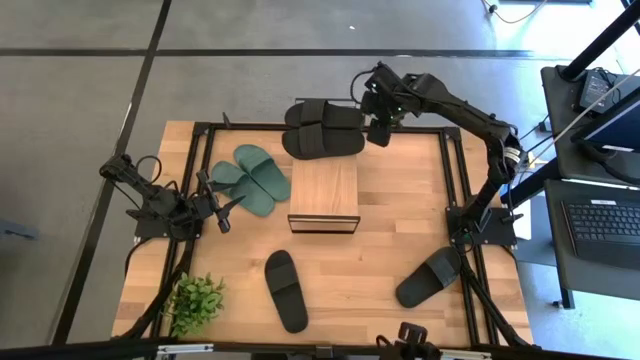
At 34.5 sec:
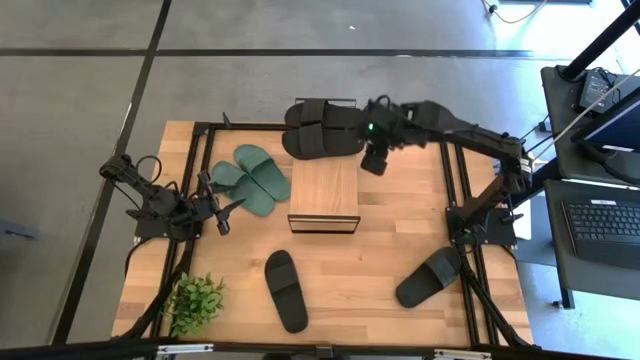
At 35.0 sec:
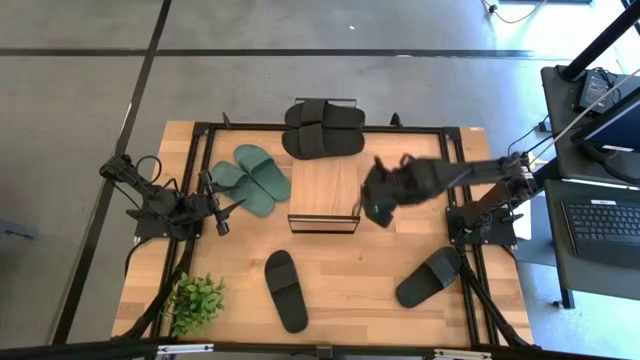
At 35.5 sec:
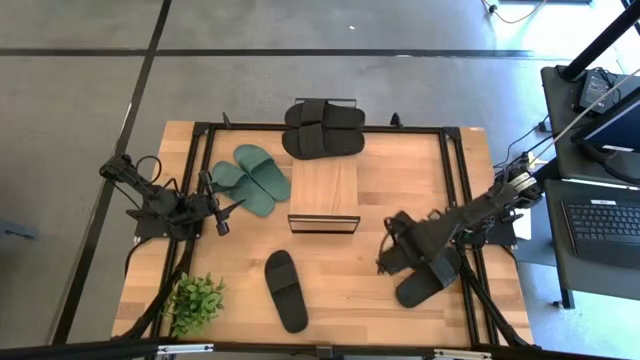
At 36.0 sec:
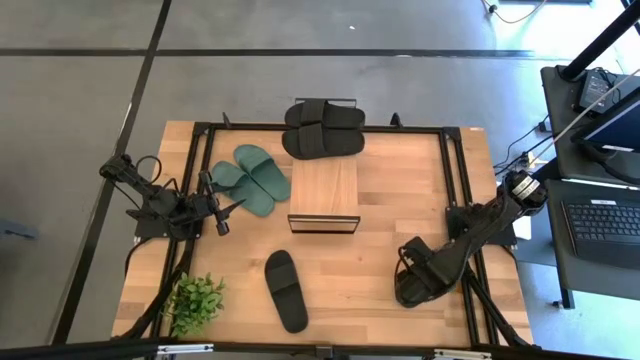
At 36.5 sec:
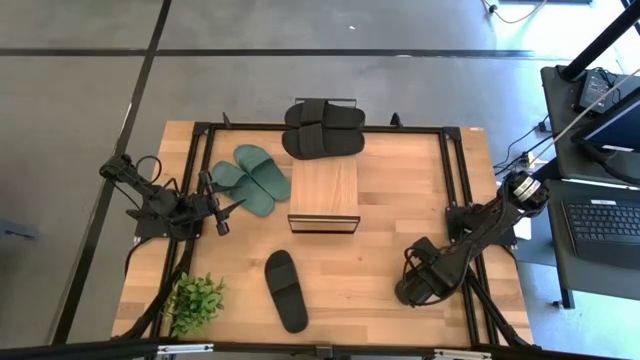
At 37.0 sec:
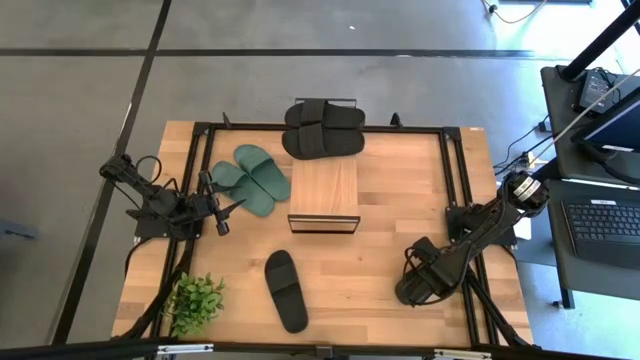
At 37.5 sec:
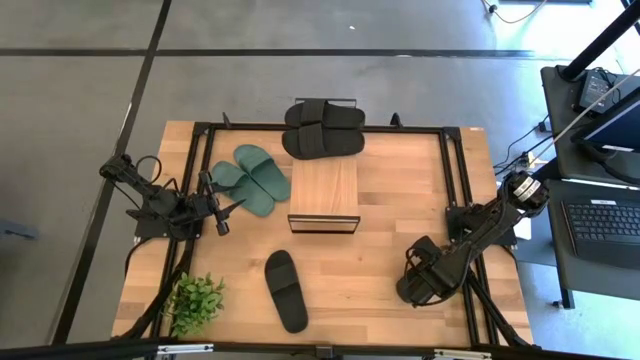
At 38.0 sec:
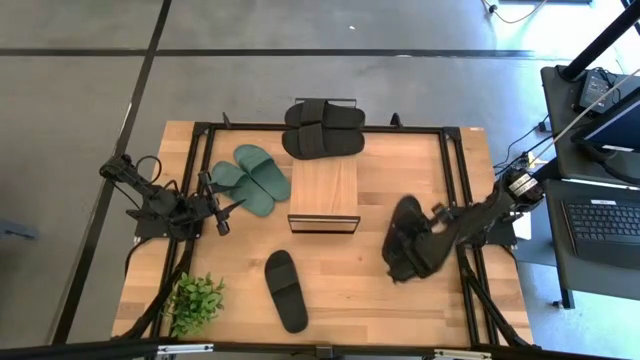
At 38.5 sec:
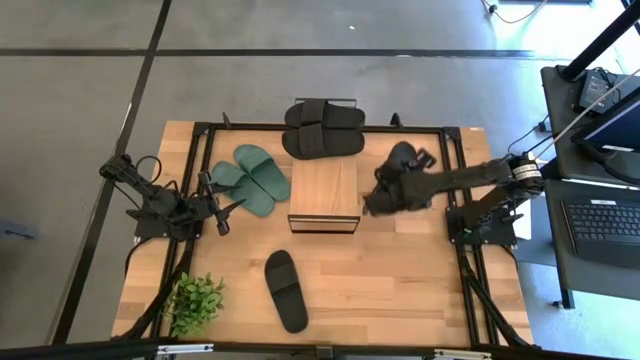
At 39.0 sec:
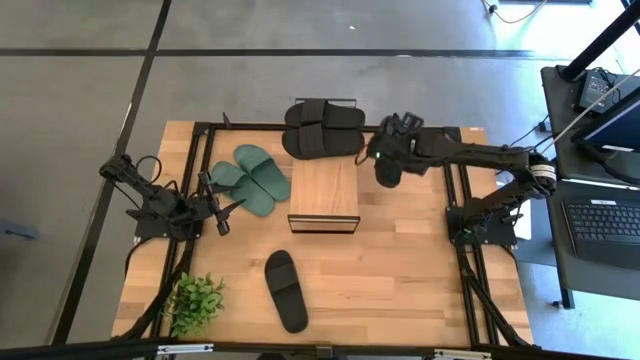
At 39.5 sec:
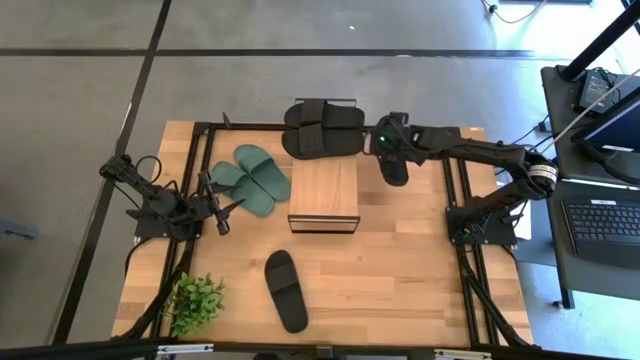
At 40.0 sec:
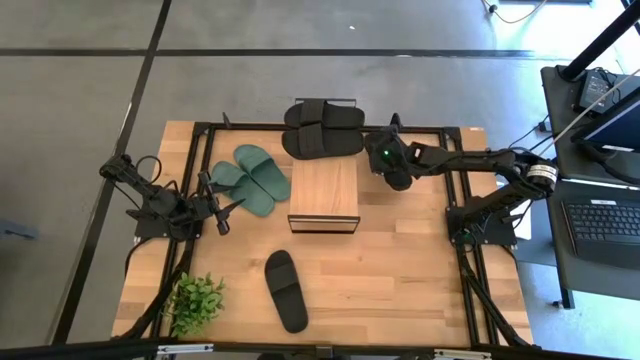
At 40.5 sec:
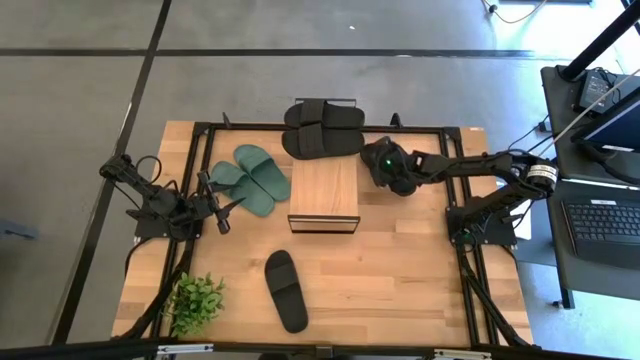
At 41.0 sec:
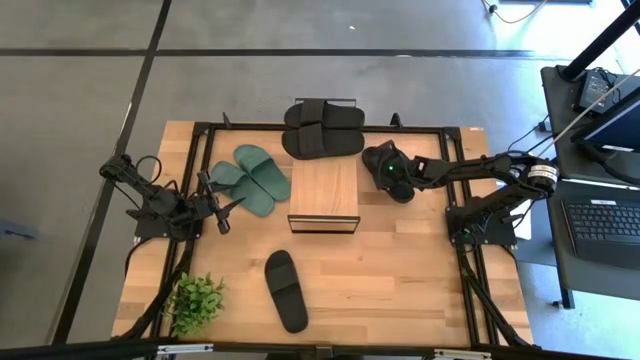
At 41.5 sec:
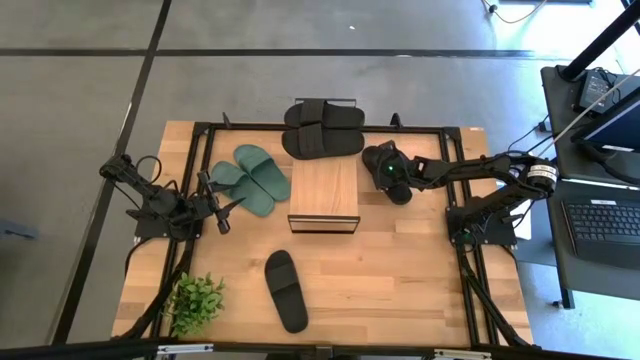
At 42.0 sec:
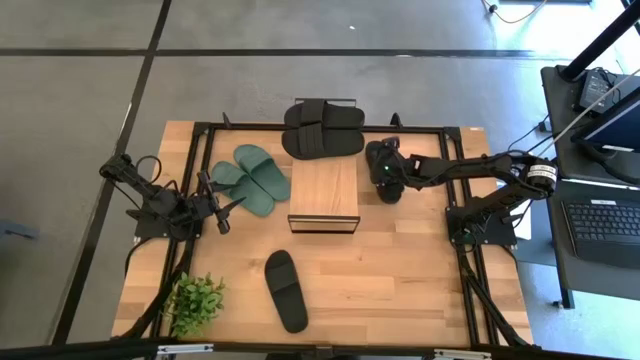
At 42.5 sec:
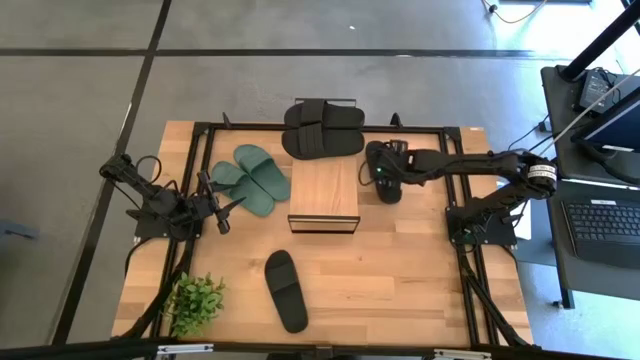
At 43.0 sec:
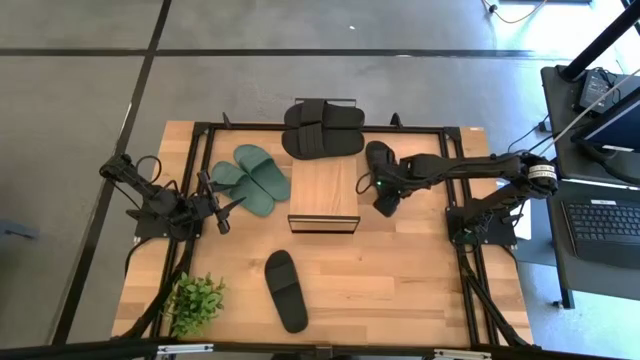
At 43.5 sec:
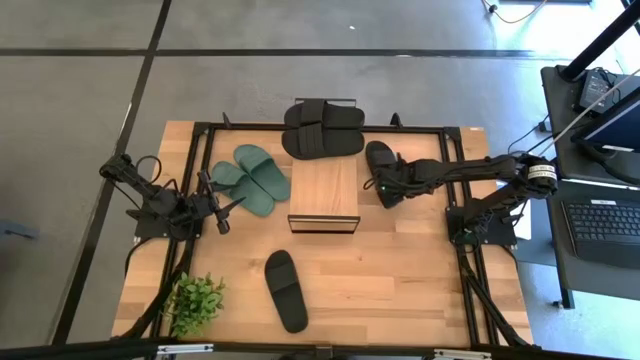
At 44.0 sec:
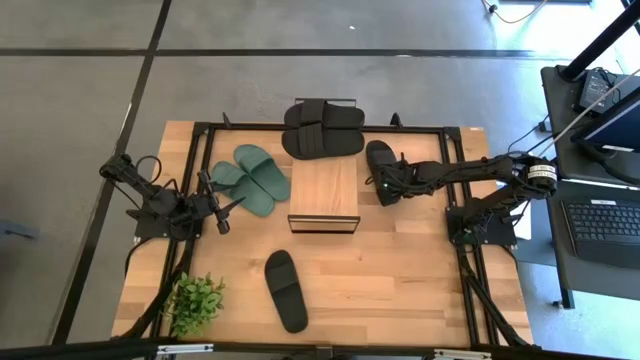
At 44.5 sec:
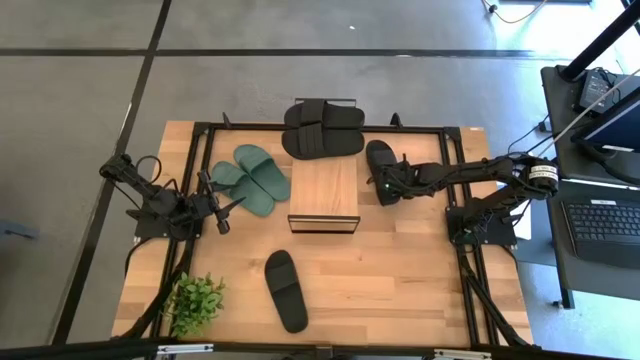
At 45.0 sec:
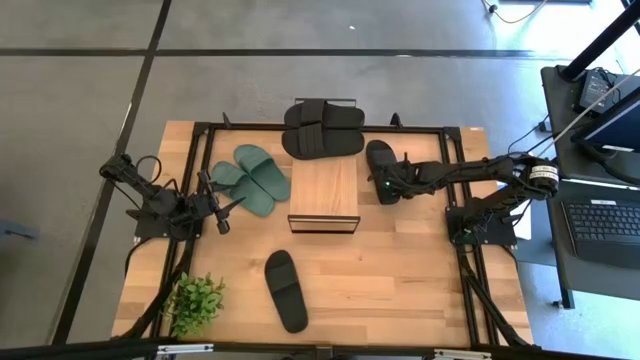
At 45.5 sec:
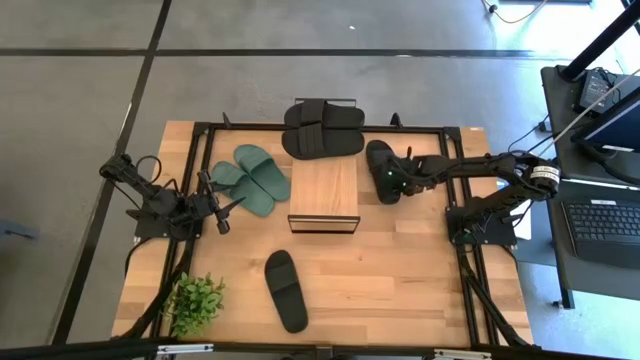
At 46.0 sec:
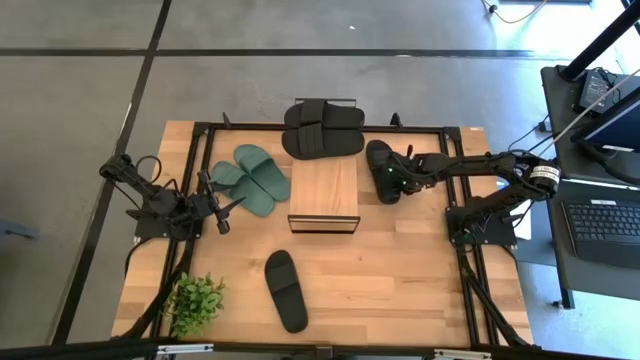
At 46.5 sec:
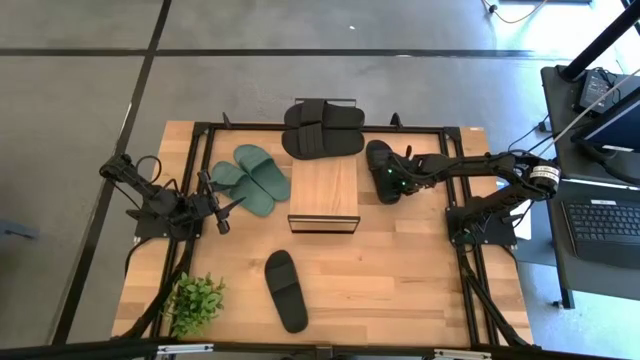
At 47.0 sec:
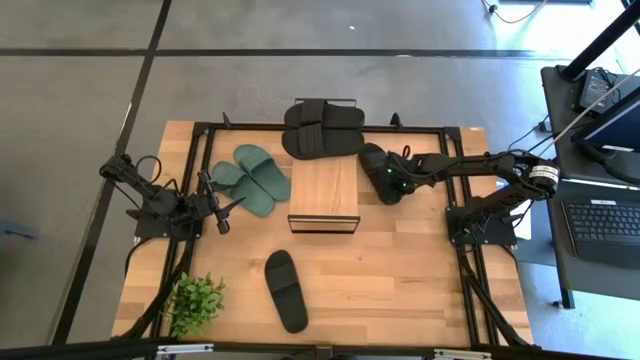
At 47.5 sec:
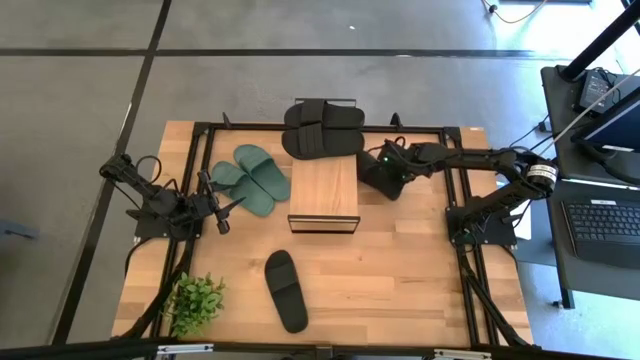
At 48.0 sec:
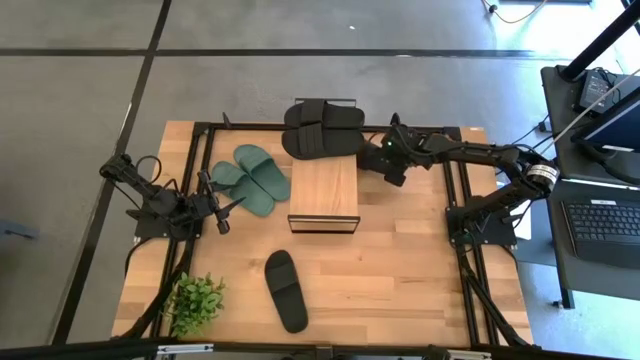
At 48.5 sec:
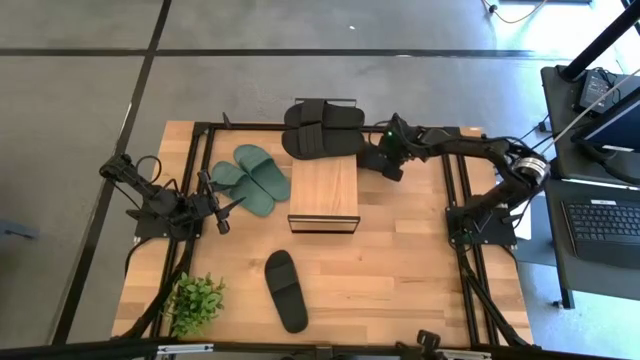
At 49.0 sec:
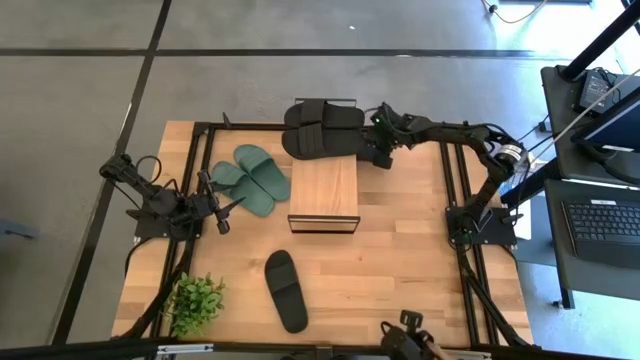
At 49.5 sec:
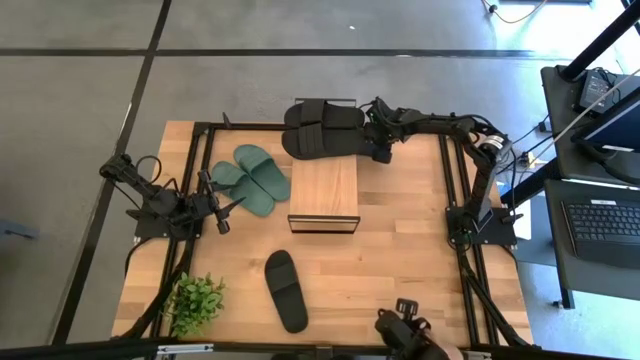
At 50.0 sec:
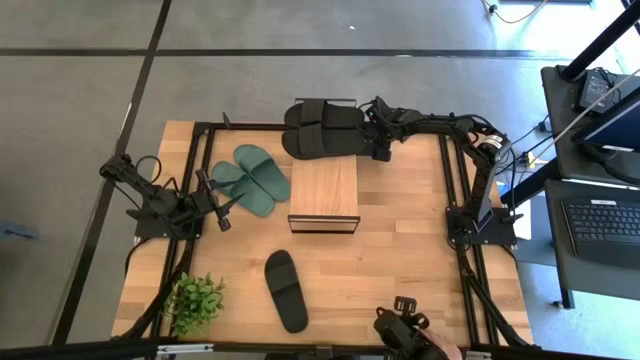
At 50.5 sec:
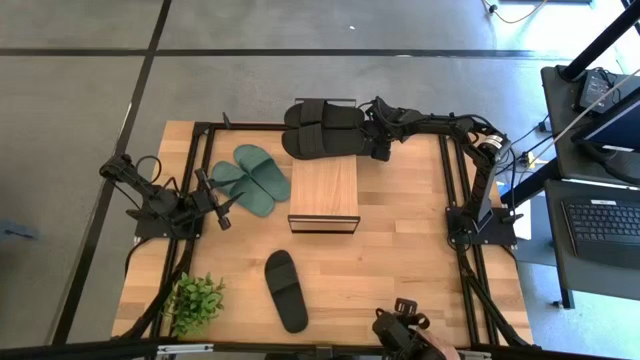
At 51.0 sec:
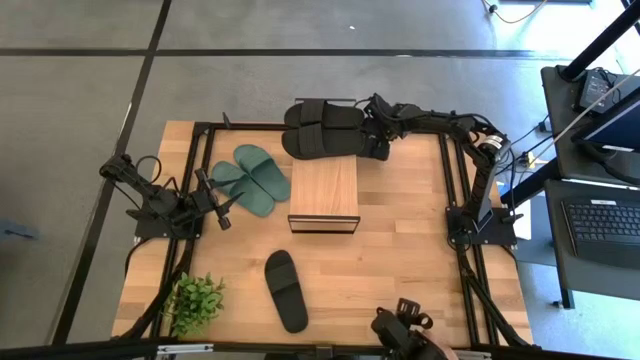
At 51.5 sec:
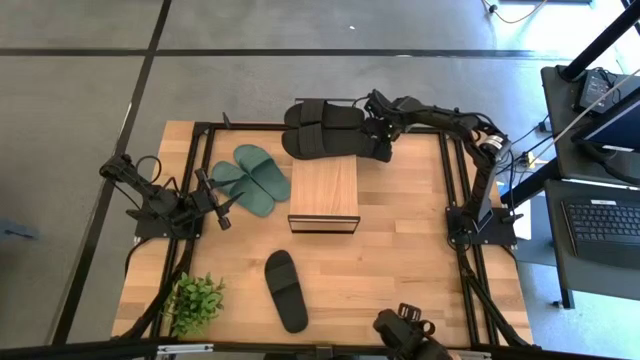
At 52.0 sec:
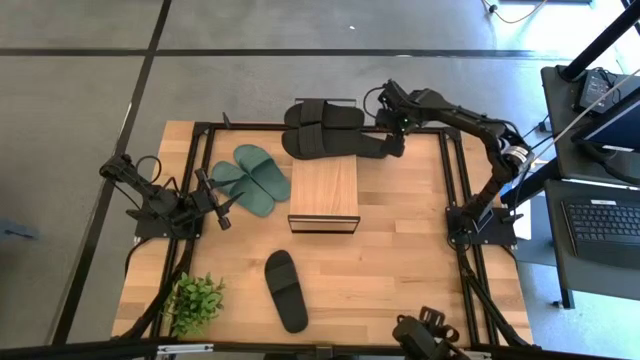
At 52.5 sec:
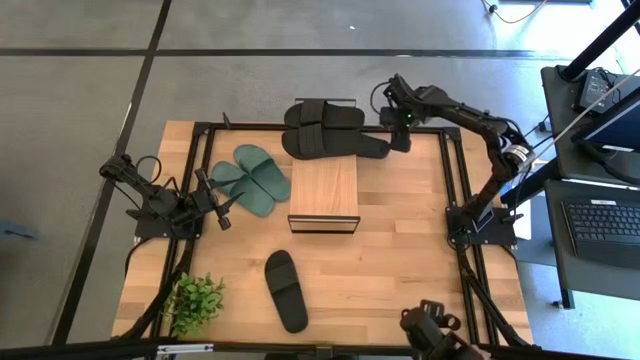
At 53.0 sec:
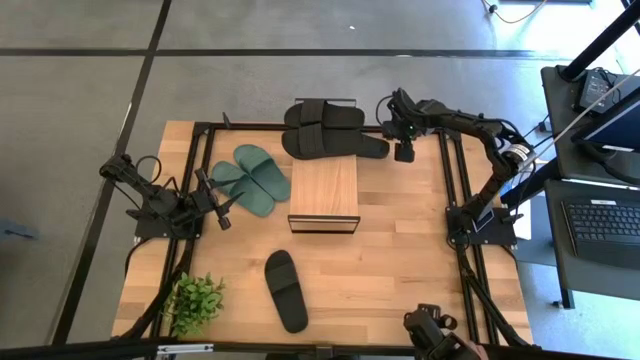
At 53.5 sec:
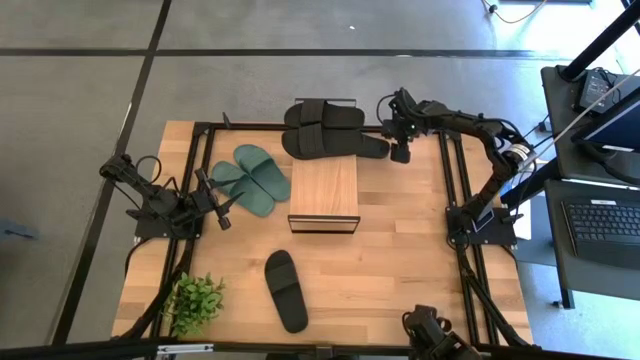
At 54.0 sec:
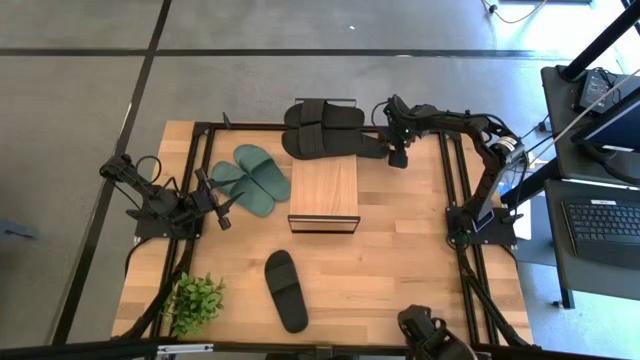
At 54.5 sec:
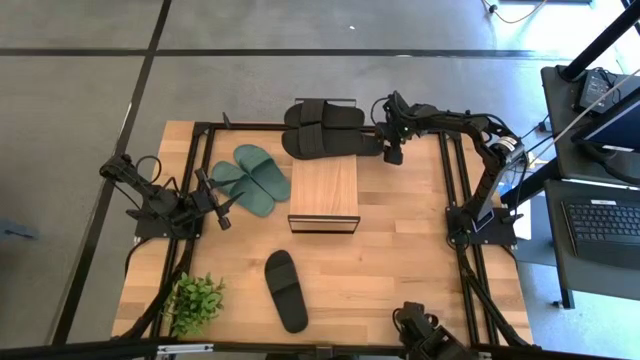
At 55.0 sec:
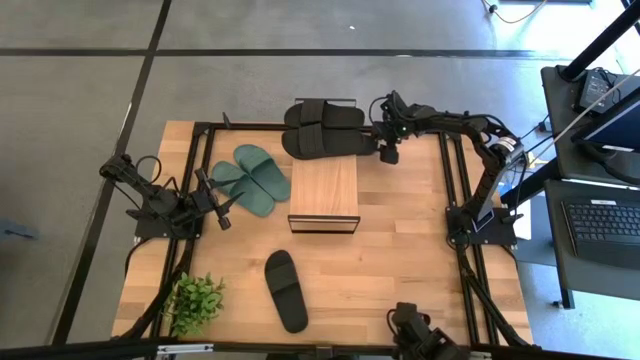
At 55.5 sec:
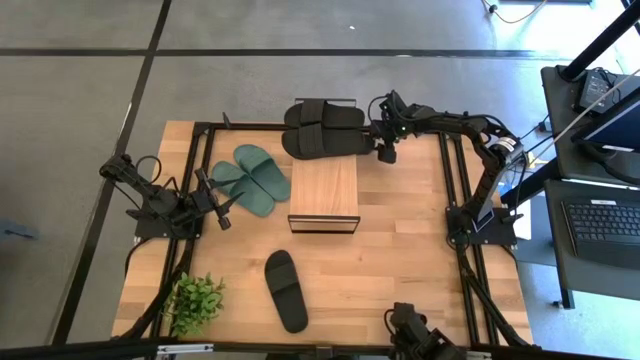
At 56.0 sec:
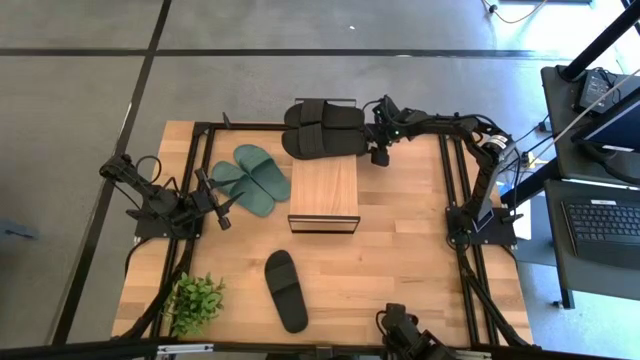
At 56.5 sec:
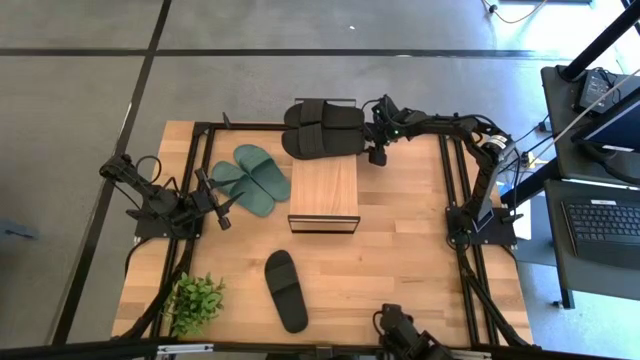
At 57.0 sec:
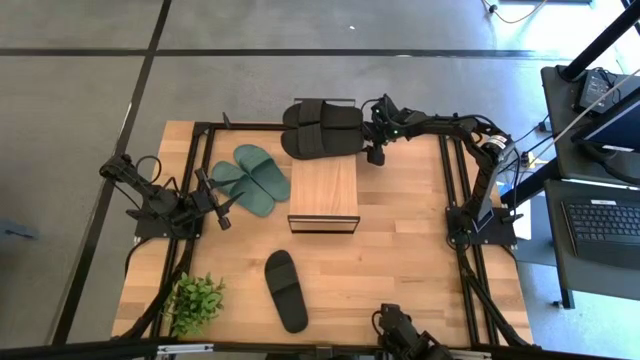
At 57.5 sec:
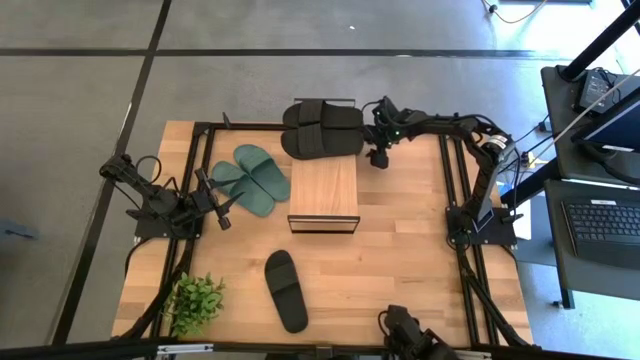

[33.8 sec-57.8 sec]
Task: Pick and place slides into the shelf
Put the black slide under the shelf
